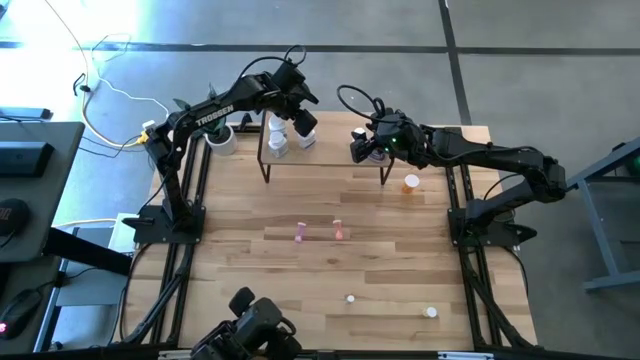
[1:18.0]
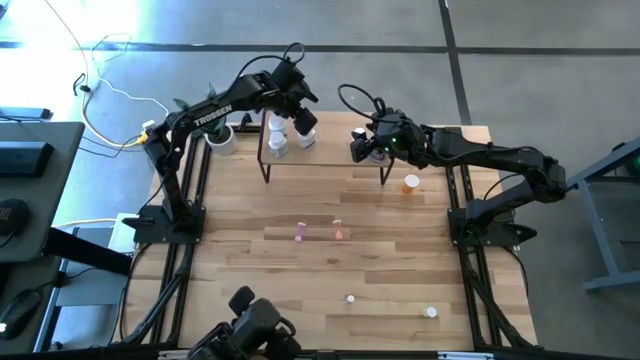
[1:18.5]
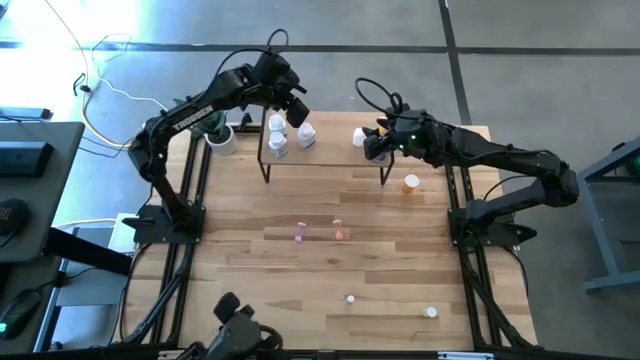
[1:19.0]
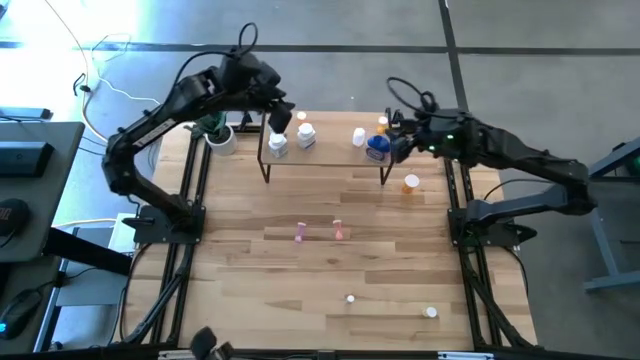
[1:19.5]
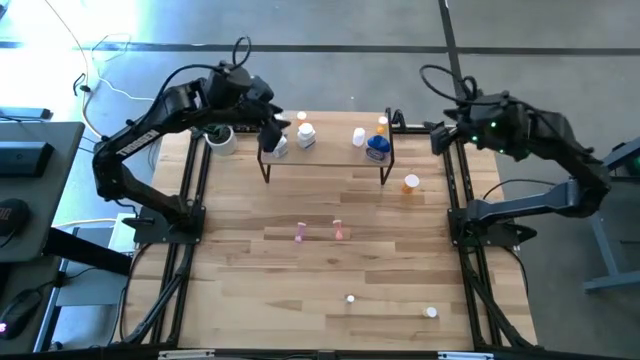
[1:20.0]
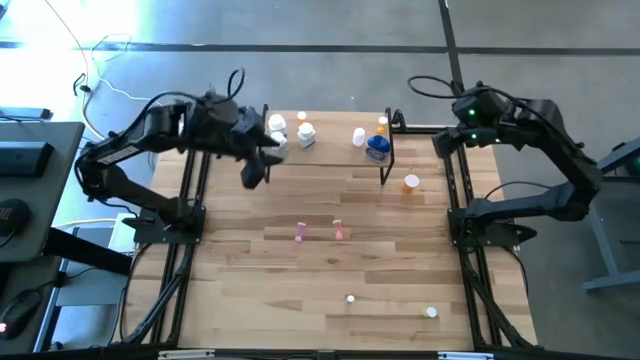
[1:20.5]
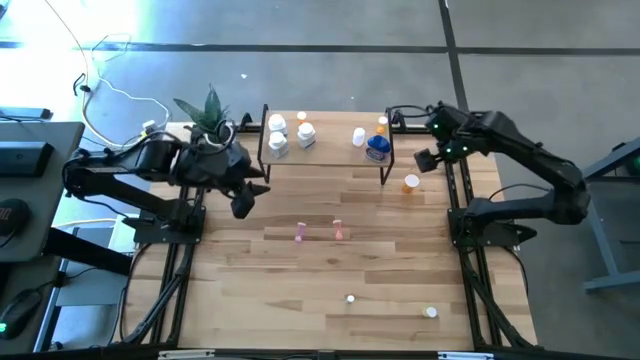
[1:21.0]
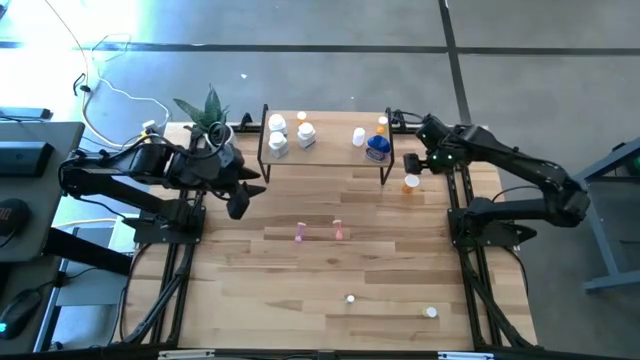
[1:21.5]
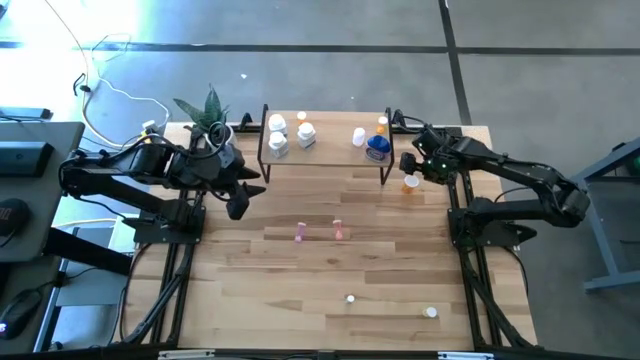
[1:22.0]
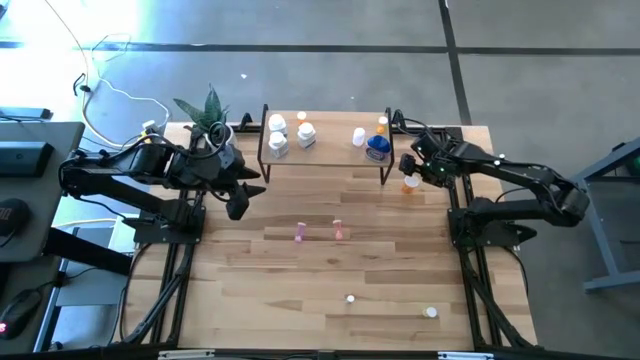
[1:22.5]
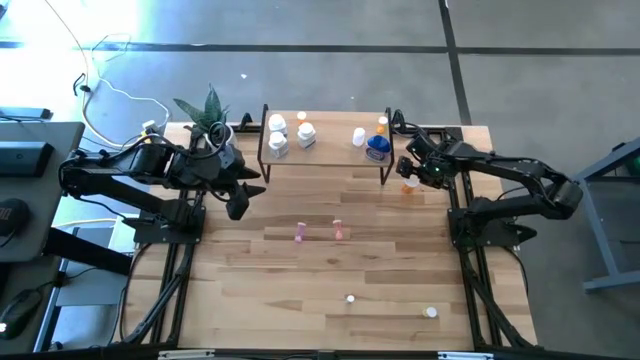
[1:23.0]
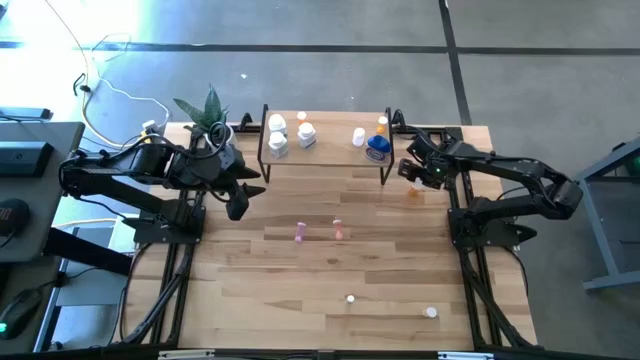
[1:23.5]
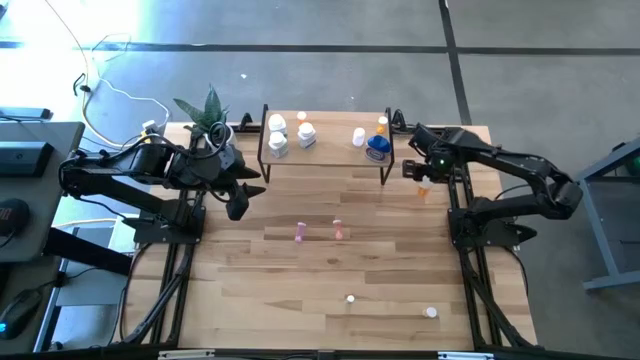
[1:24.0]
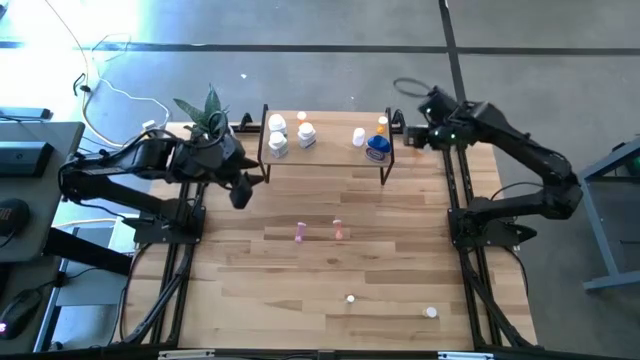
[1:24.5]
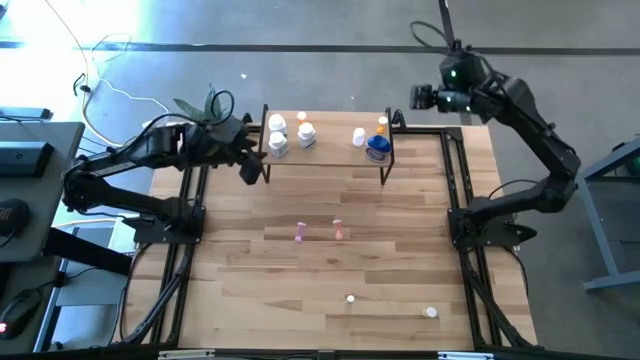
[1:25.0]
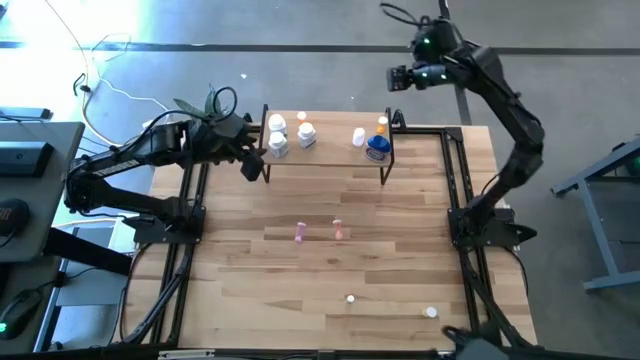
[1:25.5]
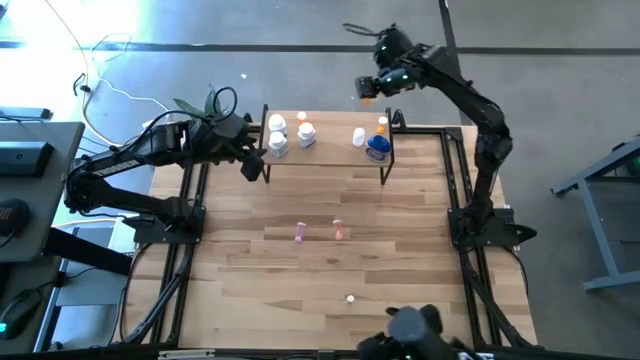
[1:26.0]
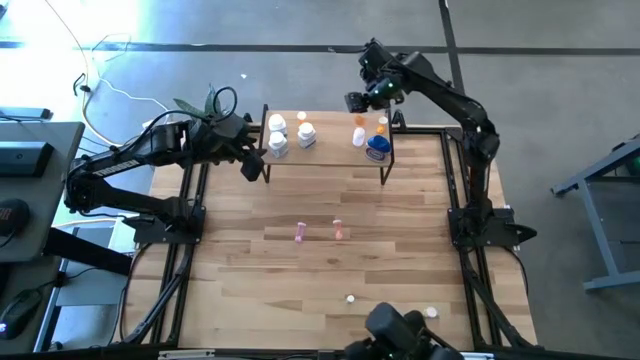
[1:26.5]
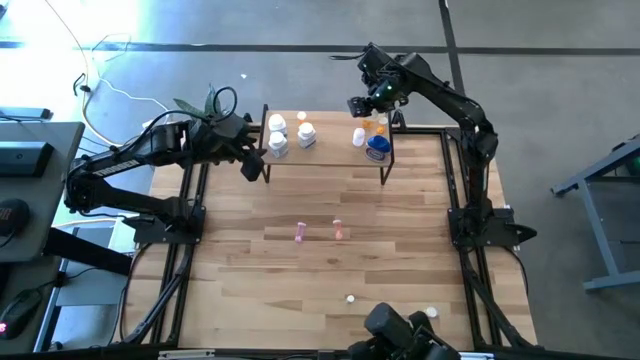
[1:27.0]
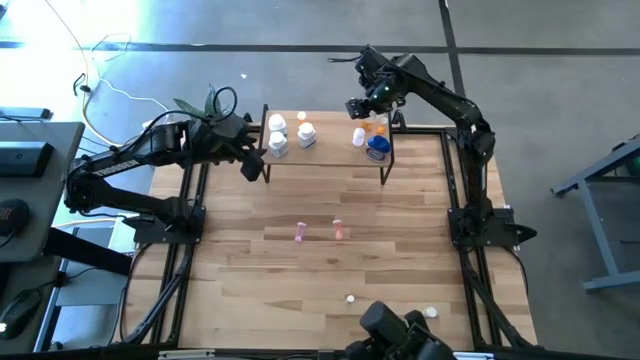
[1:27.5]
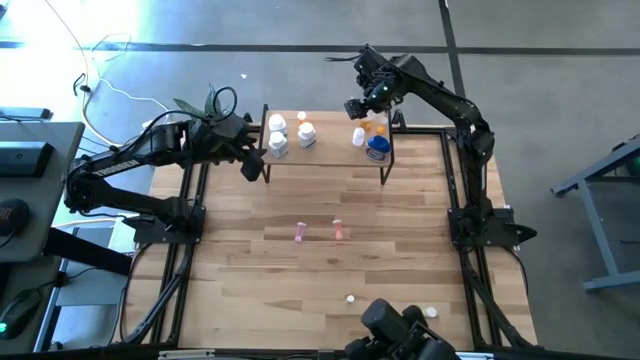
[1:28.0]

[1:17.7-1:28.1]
Task: Pick and place medicine bottles onto shelf by color
Put the orange pill bottle on the shelf

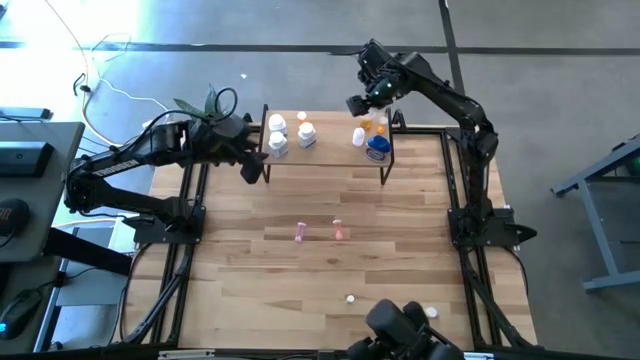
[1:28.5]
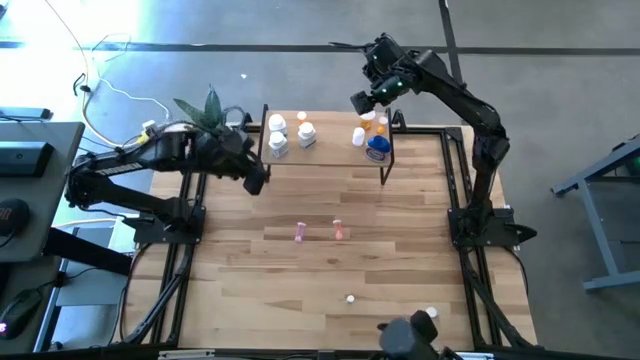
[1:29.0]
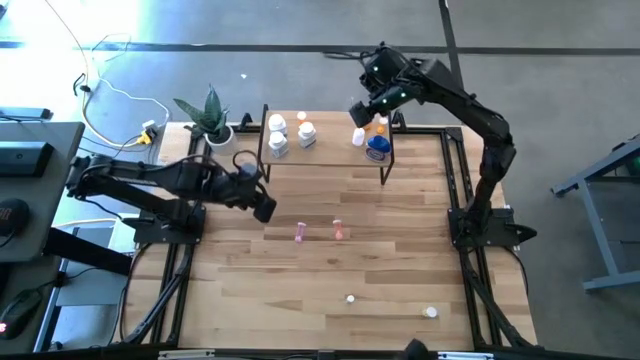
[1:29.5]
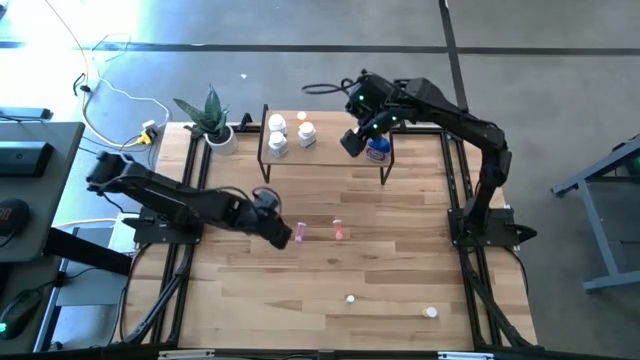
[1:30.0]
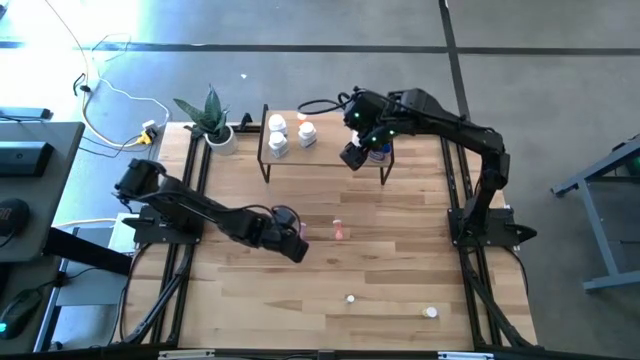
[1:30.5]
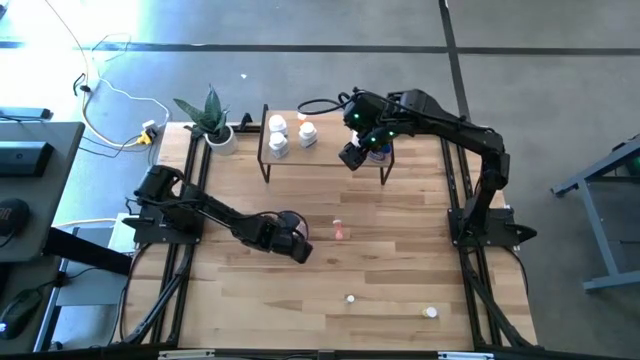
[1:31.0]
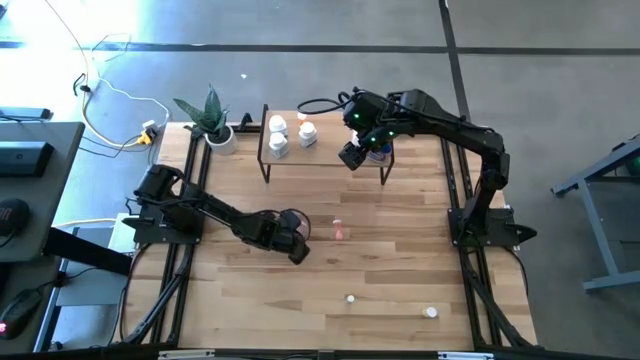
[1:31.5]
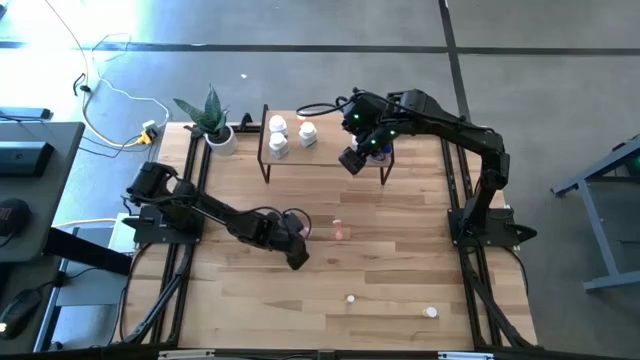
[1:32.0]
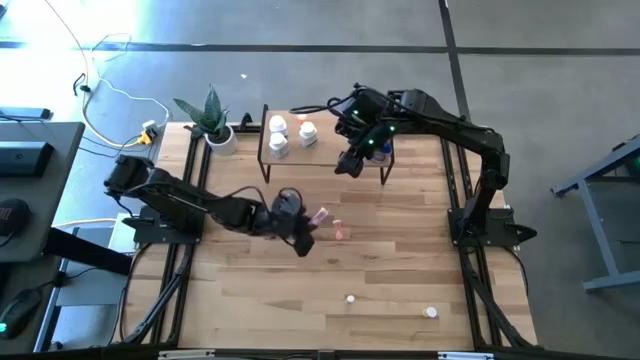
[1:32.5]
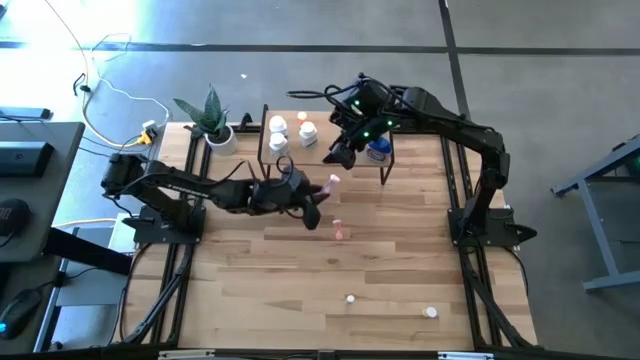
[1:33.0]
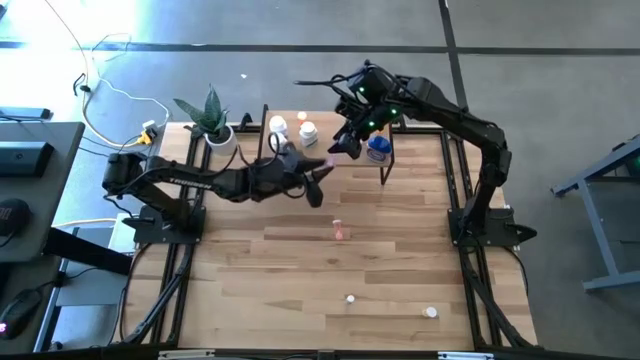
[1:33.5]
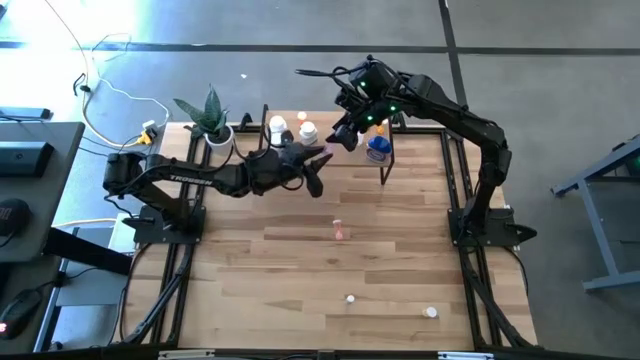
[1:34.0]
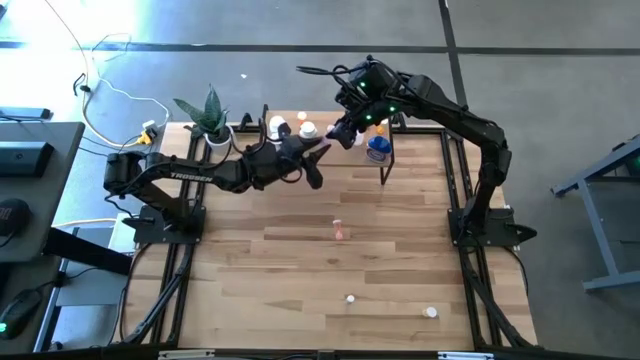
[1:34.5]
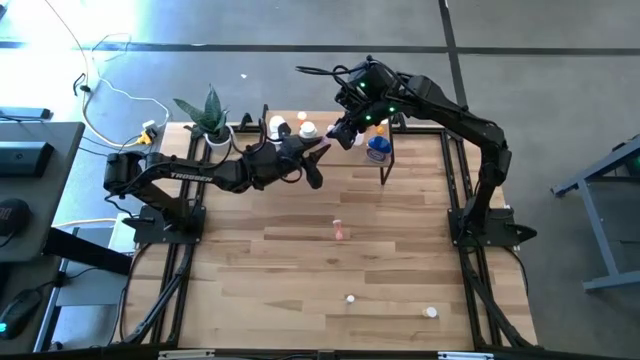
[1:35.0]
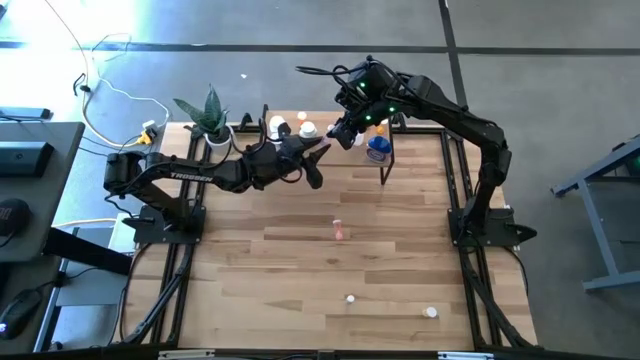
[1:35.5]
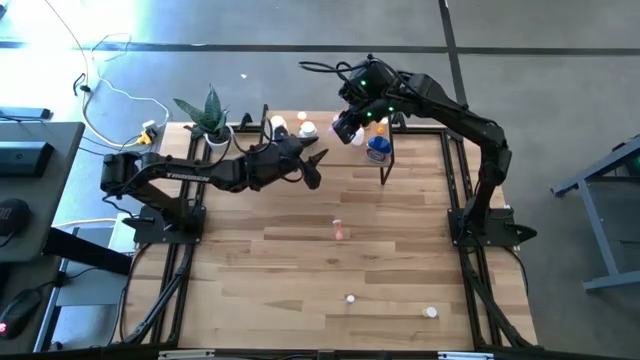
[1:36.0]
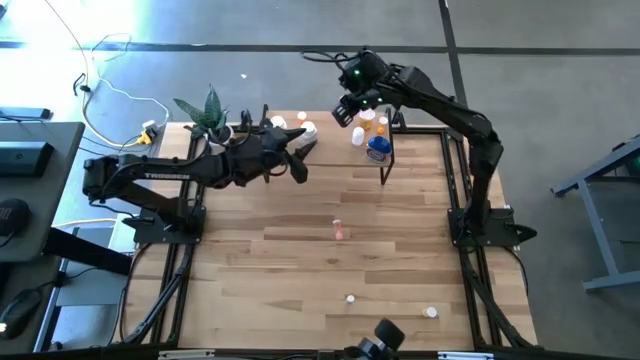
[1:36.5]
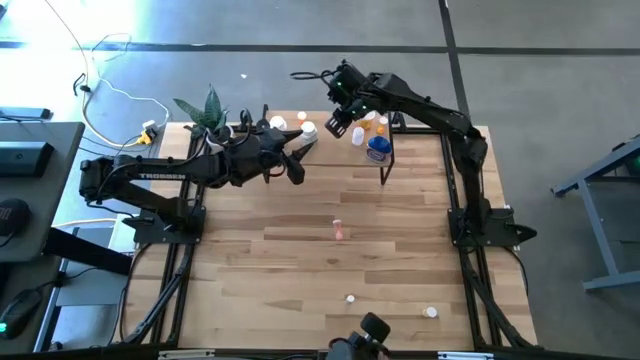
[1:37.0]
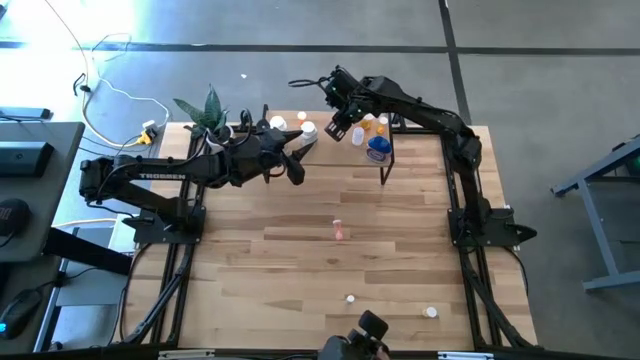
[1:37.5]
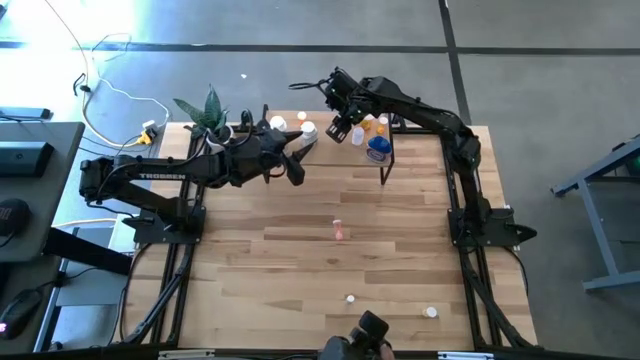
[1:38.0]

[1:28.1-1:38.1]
Put the purple pill bottle on the shelf
